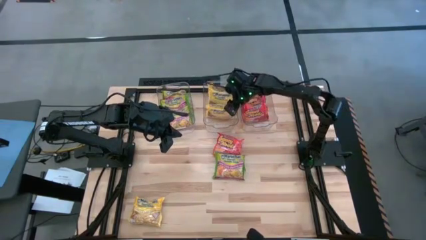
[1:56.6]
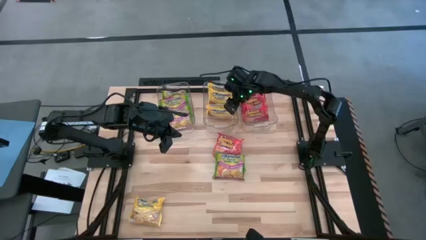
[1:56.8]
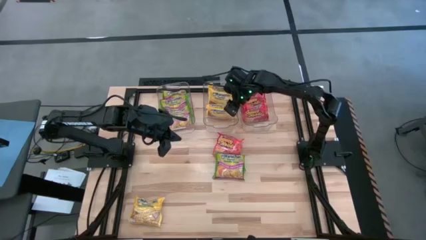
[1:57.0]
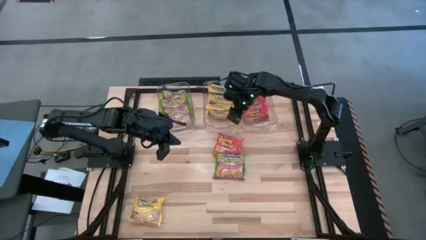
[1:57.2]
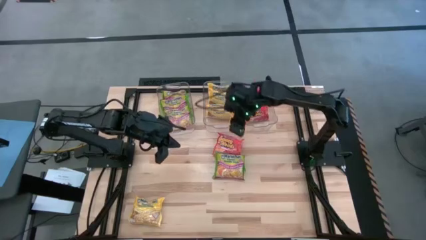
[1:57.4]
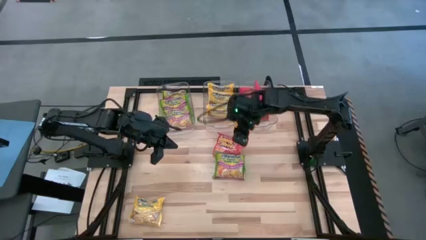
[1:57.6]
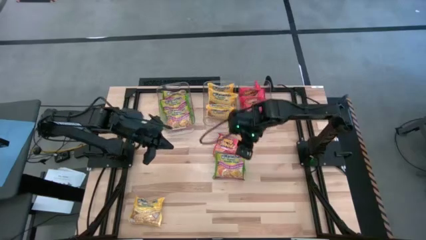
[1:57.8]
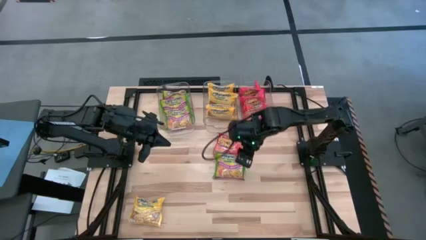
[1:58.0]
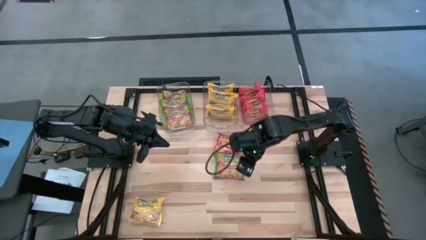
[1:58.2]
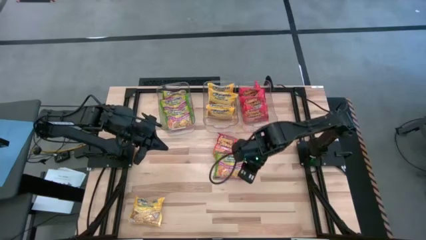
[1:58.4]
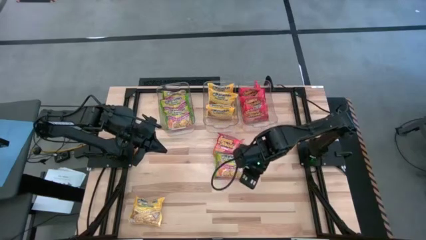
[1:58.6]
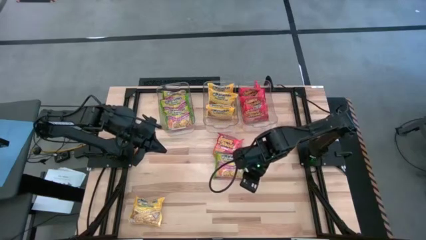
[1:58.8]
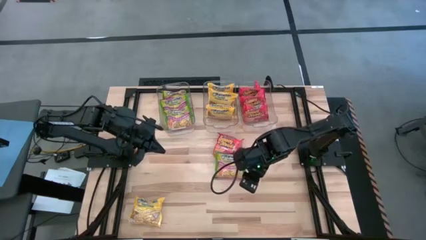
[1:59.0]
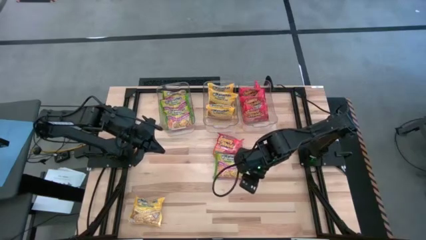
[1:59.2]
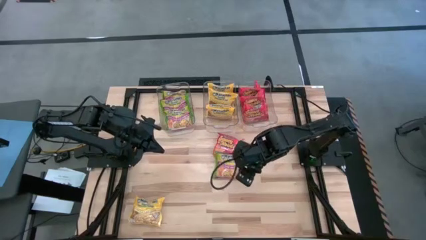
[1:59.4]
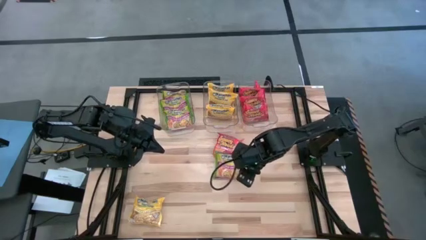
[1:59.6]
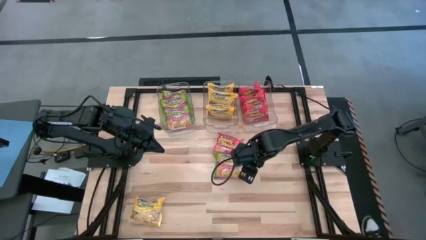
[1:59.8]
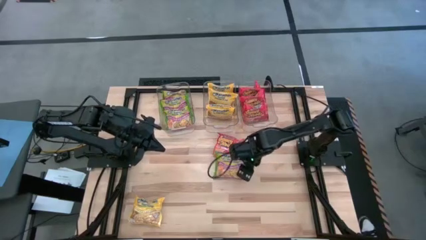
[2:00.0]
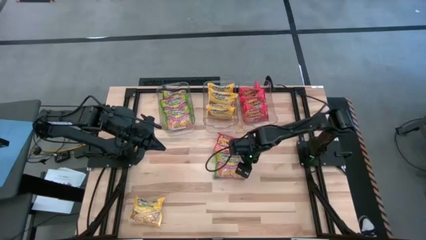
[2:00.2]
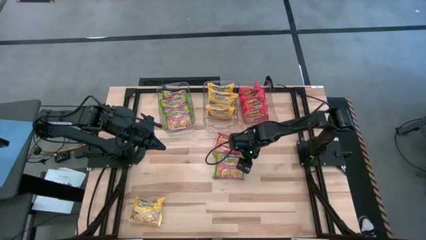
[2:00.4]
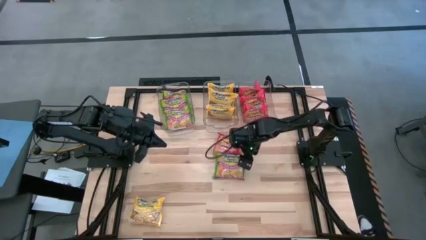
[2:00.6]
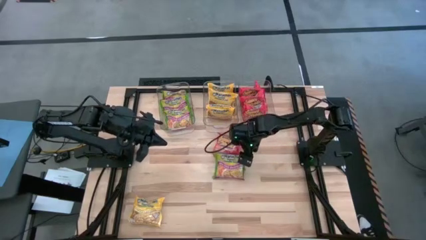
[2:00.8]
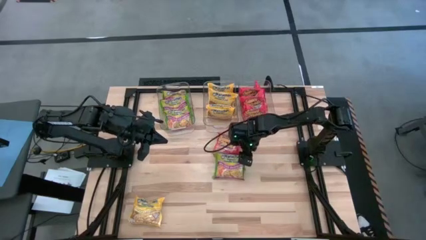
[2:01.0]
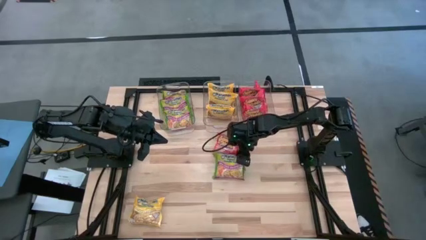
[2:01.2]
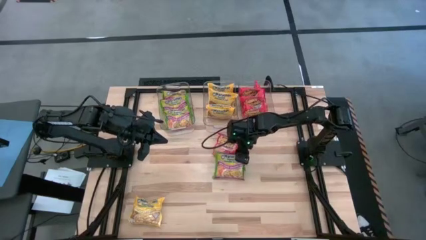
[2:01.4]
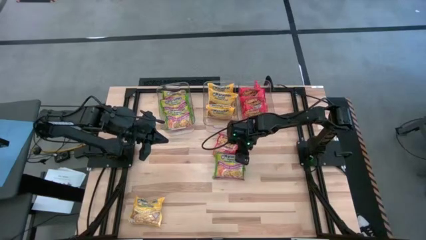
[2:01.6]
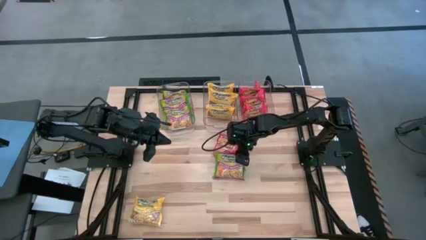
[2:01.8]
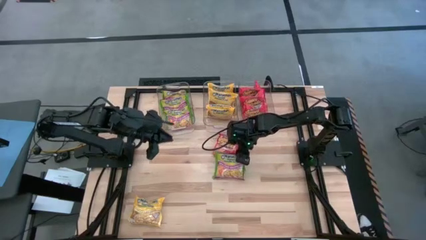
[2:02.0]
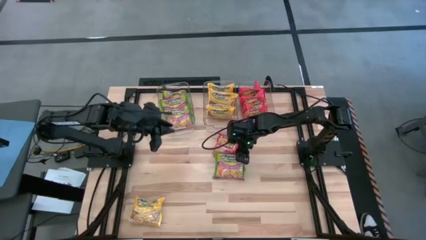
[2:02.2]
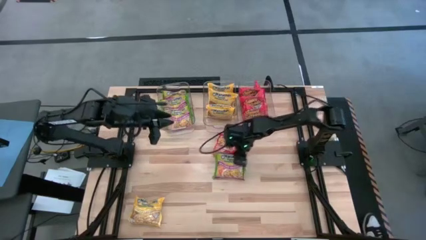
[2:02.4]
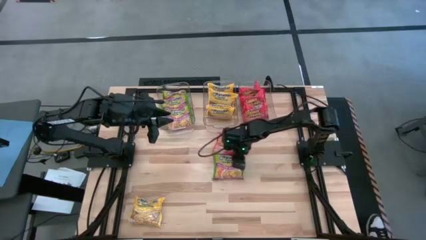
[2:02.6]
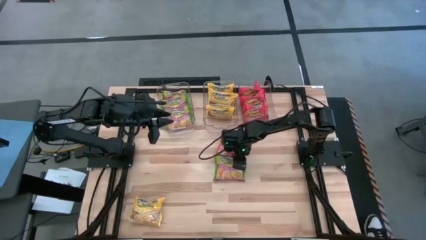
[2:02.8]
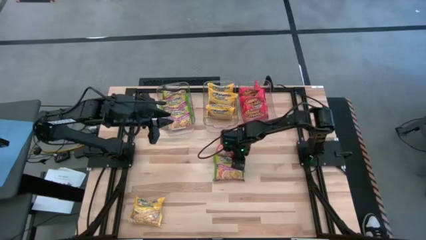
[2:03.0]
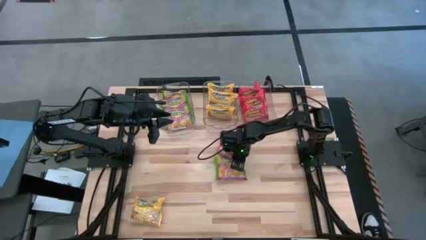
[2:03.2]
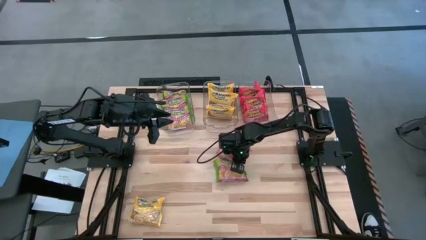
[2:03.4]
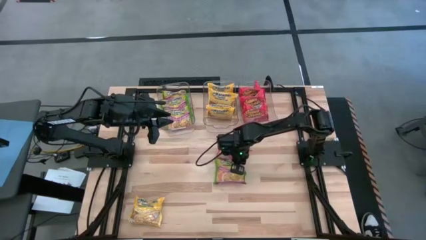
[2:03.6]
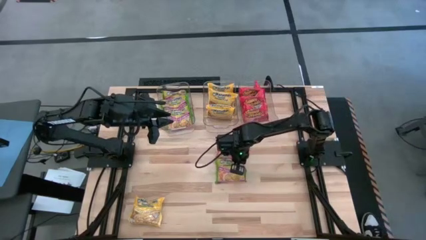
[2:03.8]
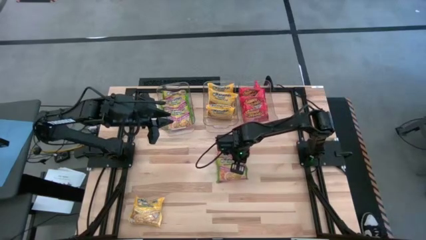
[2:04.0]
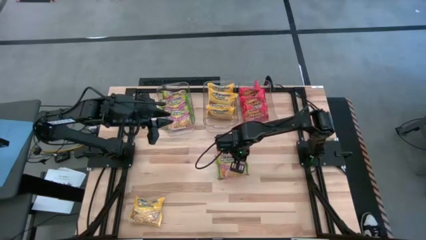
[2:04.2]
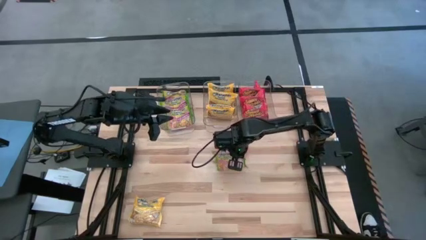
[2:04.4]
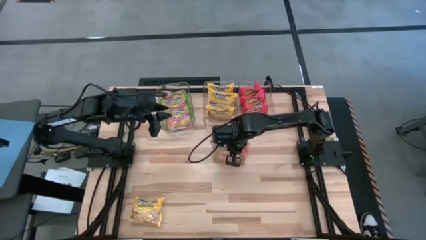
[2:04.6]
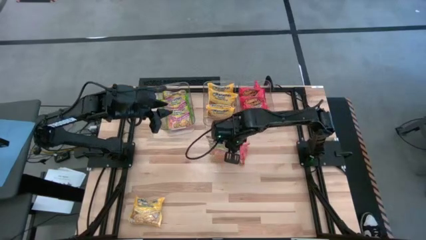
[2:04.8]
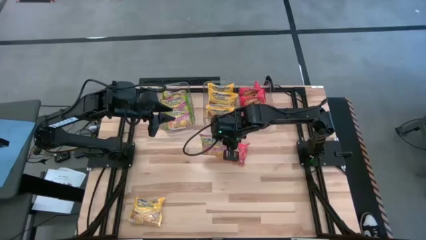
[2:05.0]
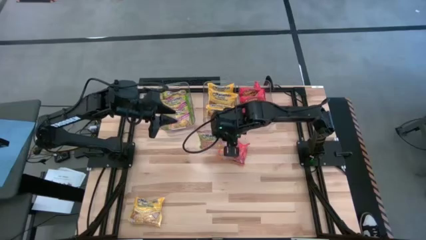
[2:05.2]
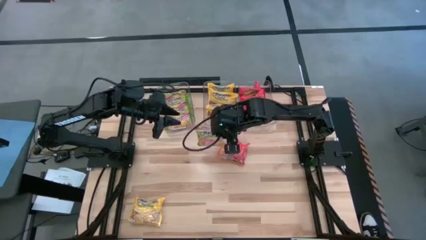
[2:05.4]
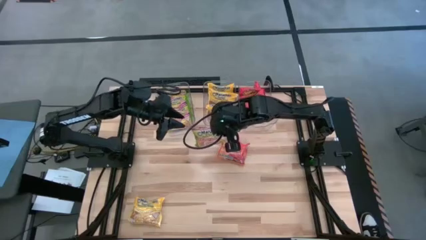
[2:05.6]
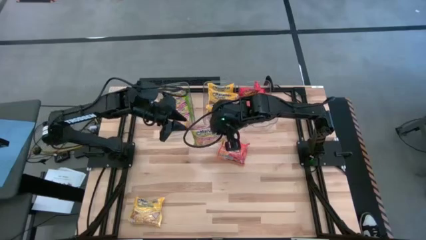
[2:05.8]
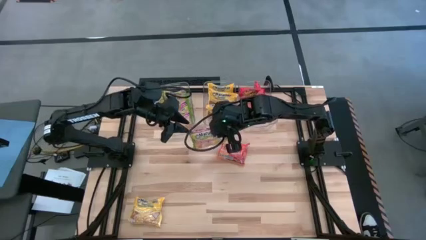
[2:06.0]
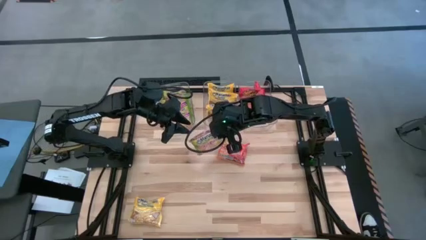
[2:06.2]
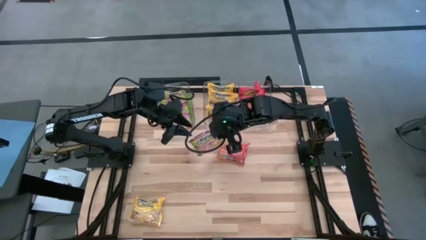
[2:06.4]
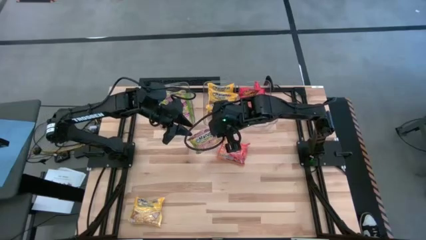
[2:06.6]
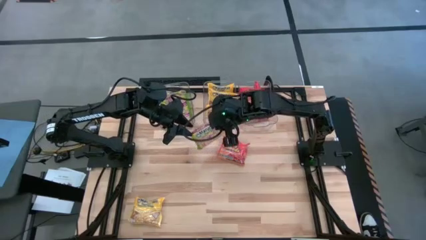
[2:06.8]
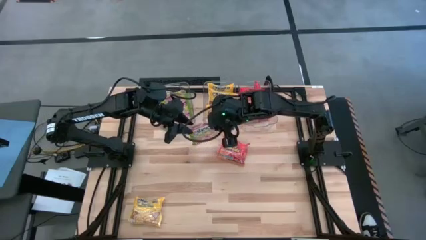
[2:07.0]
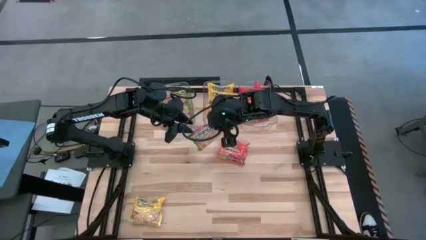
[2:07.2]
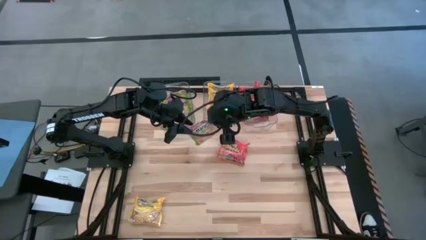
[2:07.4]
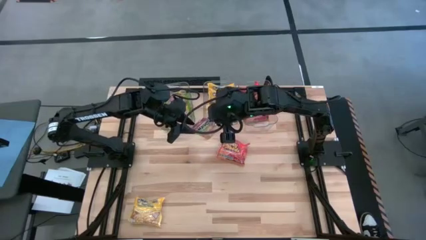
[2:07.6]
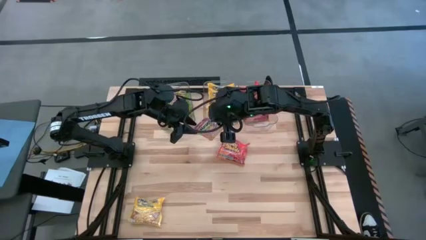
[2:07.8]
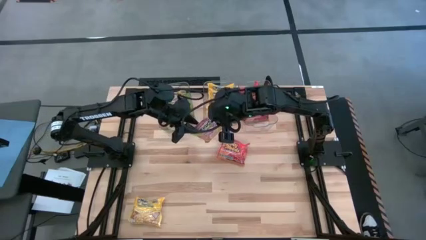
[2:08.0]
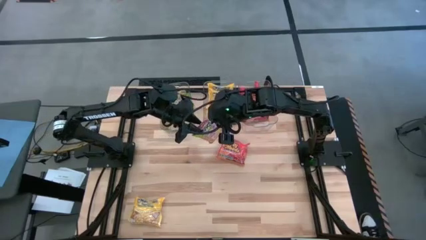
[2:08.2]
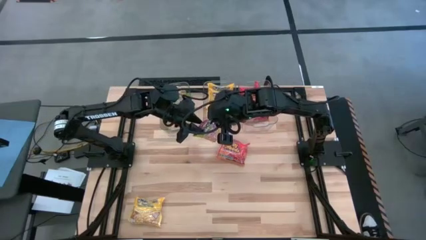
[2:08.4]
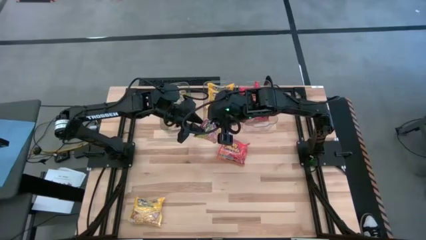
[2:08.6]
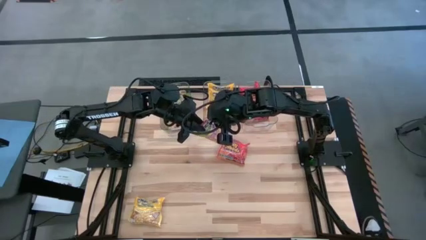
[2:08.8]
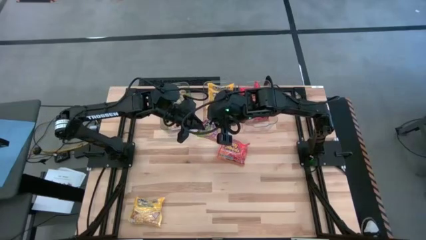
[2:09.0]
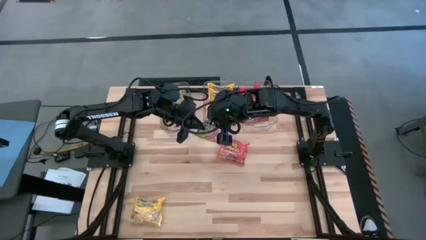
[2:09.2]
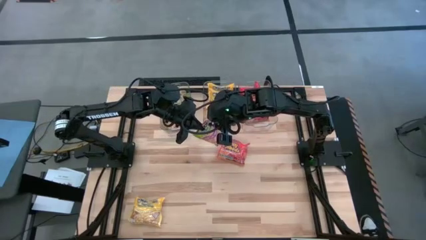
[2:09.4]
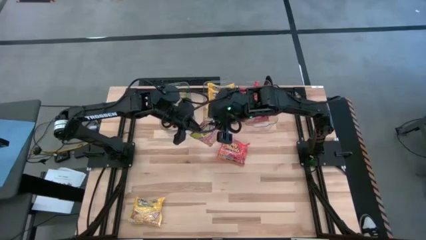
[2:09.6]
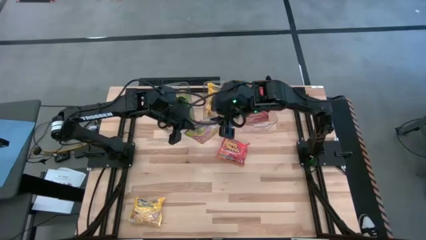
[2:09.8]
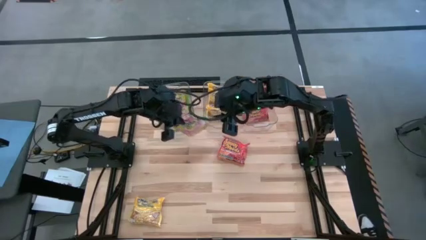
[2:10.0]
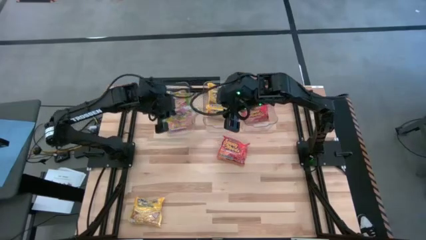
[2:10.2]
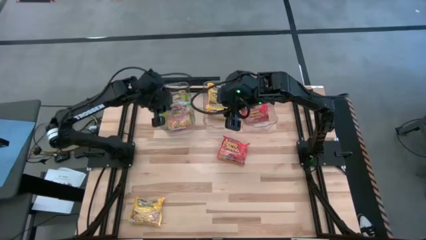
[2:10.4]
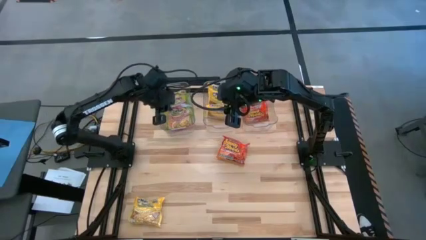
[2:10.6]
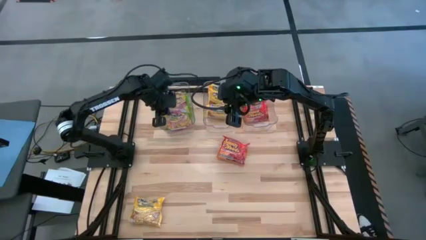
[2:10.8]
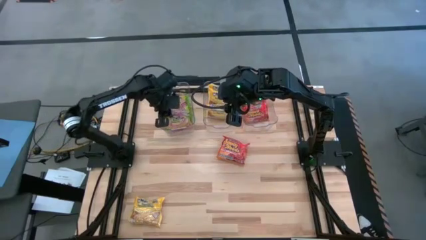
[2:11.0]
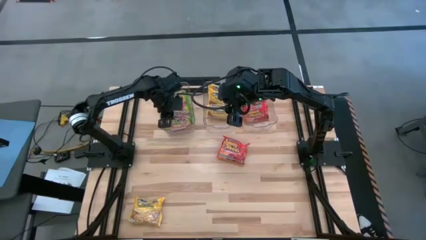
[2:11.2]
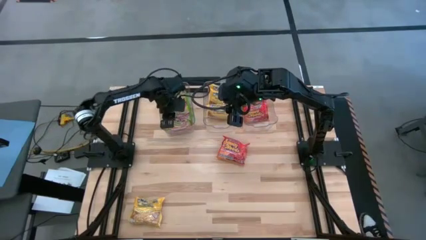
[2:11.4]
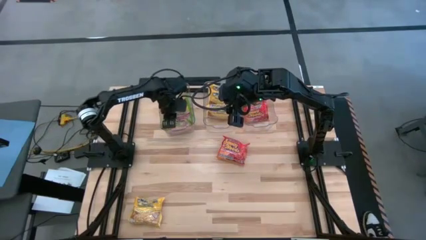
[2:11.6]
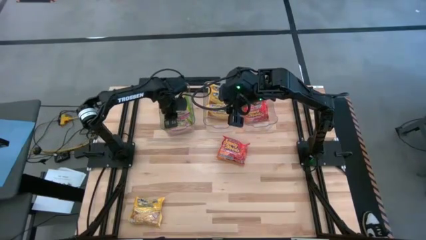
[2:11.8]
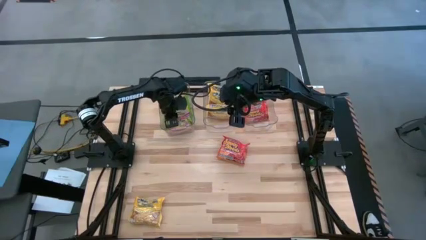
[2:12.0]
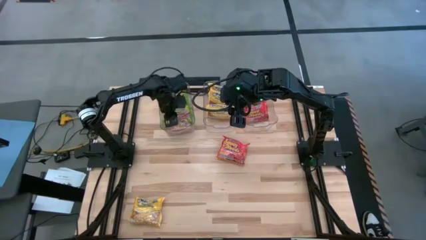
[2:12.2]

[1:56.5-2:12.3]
Task: Sort Maruchan noodles
Put the green noodle pack into the left transparent bin

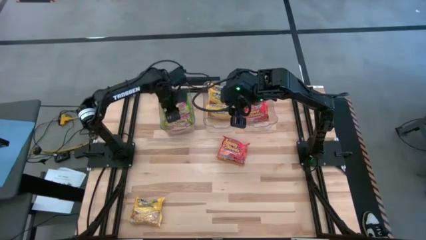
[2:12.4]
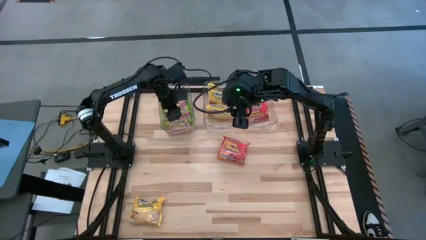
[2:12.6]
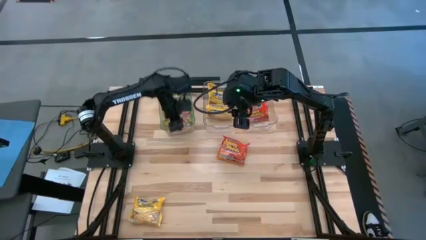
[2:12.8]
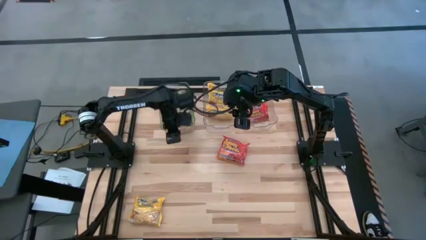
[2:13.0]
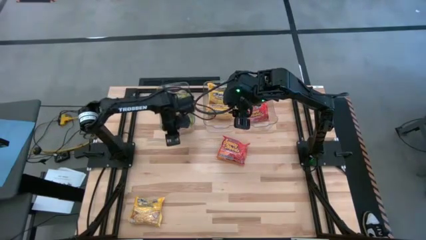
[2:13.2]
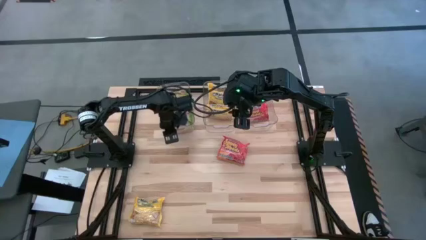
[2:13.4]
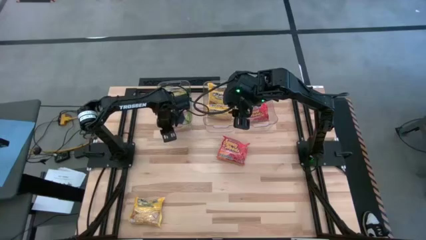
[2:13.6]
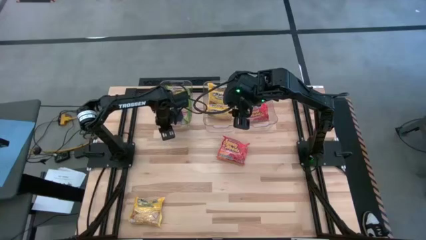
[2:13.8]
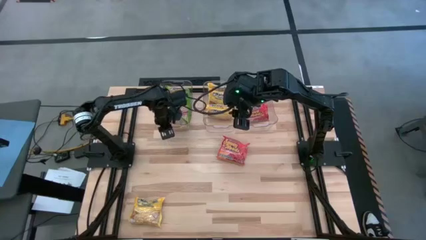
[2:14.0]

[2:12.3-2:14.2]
Adjust the left transparent bin
